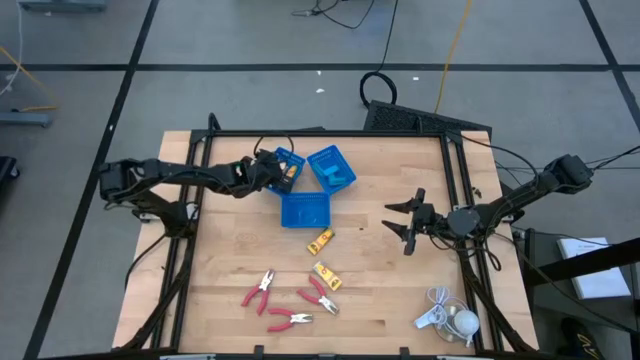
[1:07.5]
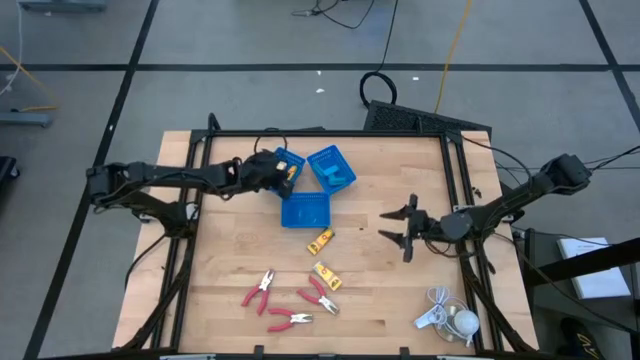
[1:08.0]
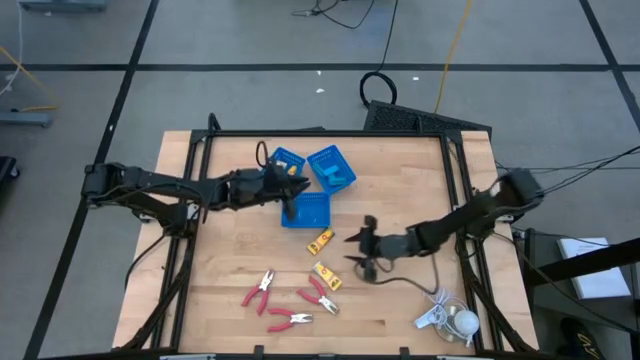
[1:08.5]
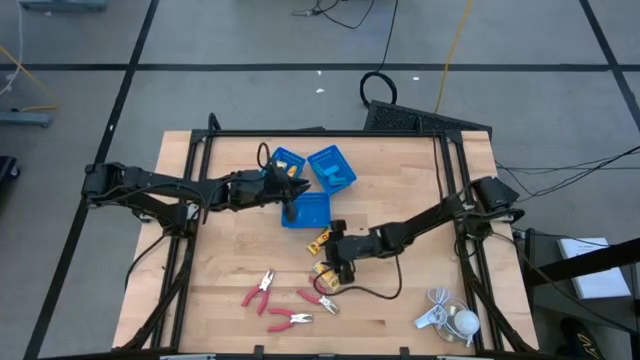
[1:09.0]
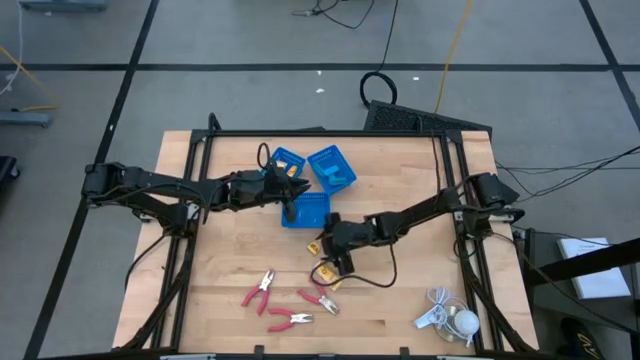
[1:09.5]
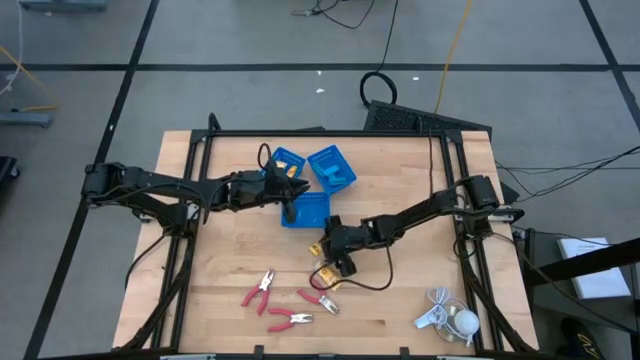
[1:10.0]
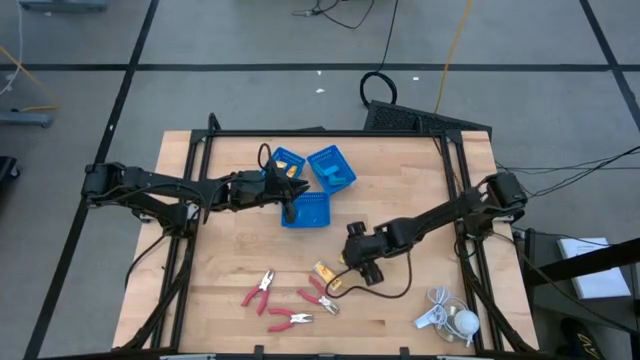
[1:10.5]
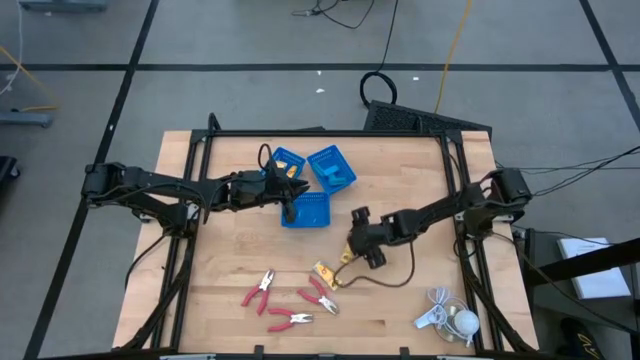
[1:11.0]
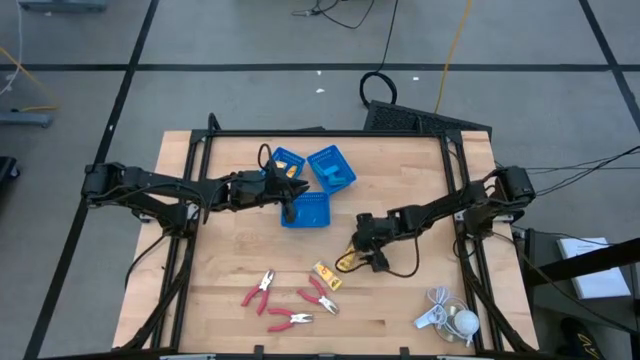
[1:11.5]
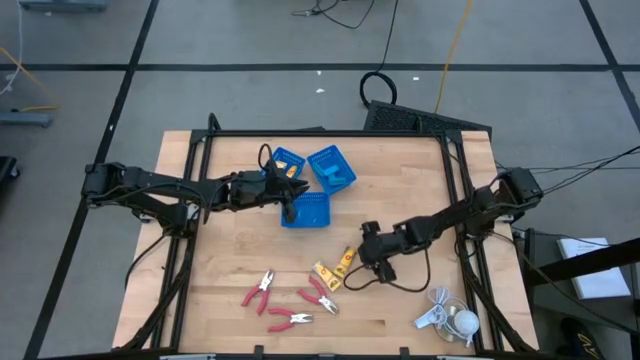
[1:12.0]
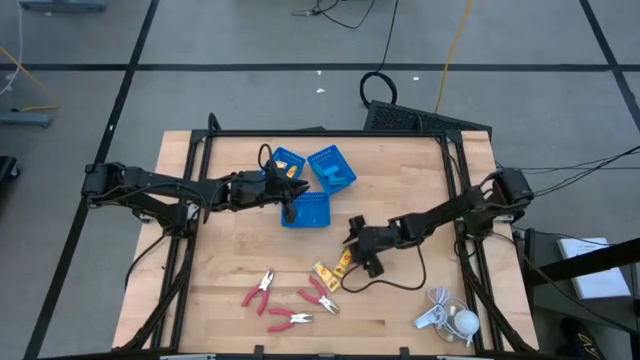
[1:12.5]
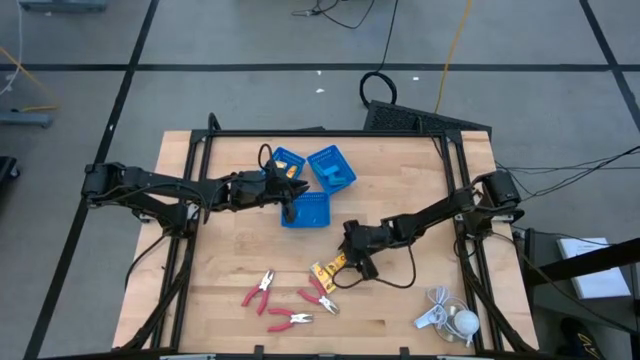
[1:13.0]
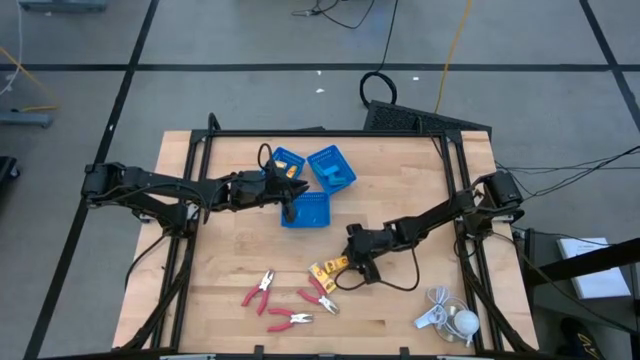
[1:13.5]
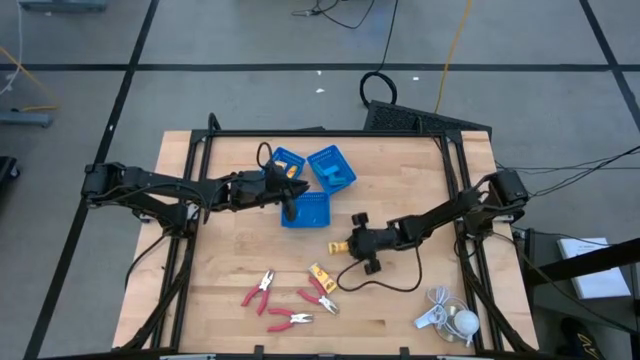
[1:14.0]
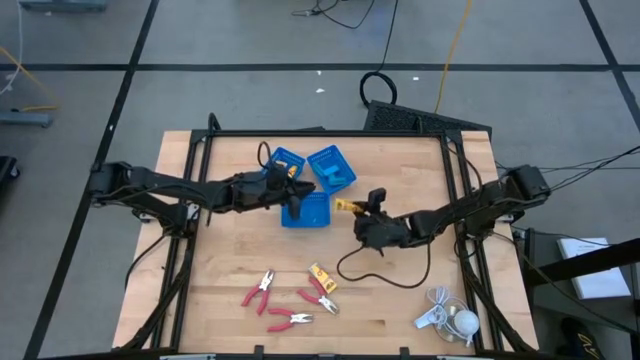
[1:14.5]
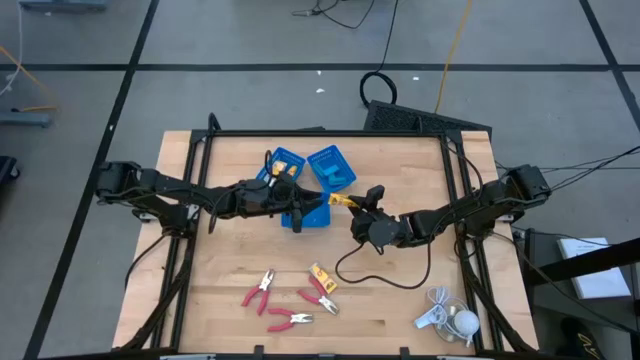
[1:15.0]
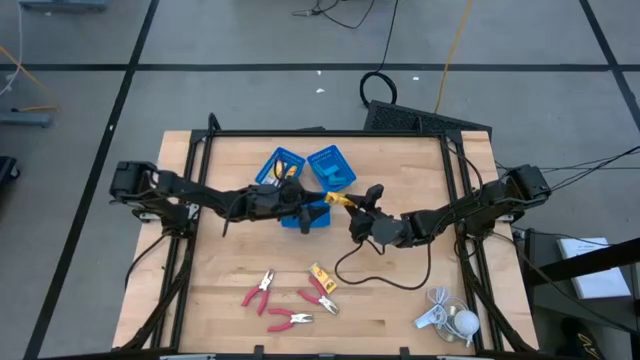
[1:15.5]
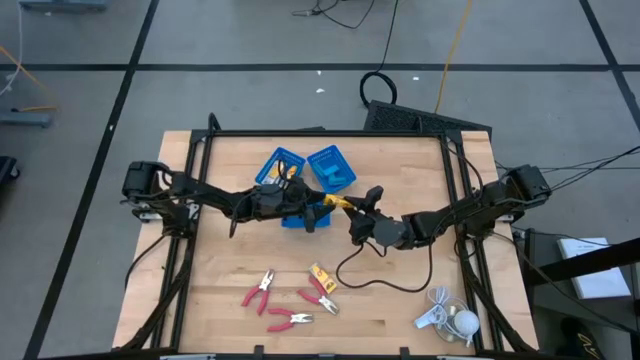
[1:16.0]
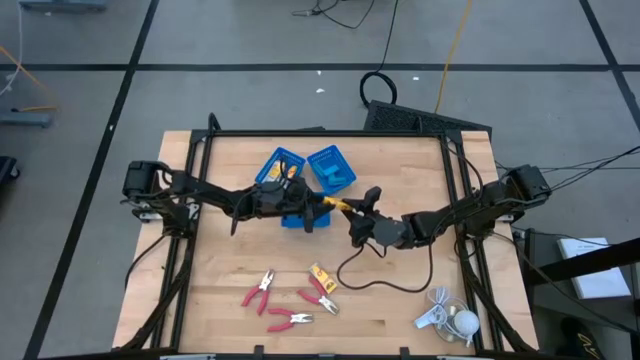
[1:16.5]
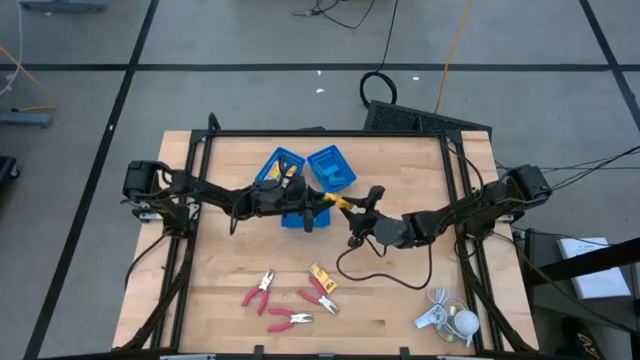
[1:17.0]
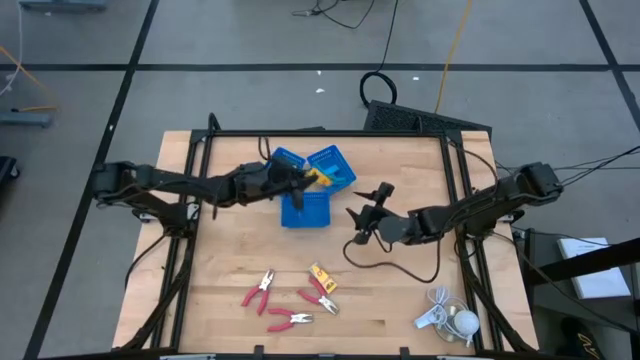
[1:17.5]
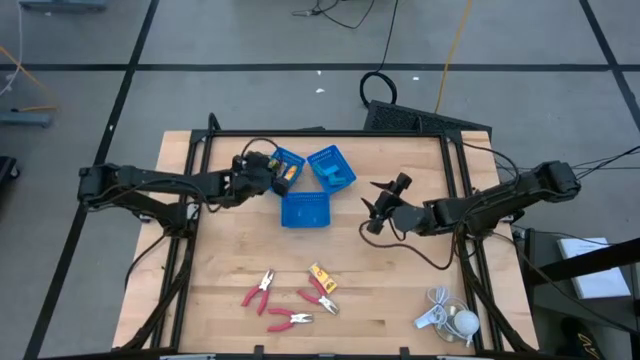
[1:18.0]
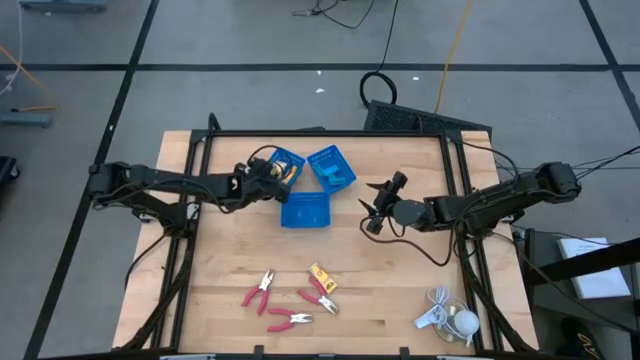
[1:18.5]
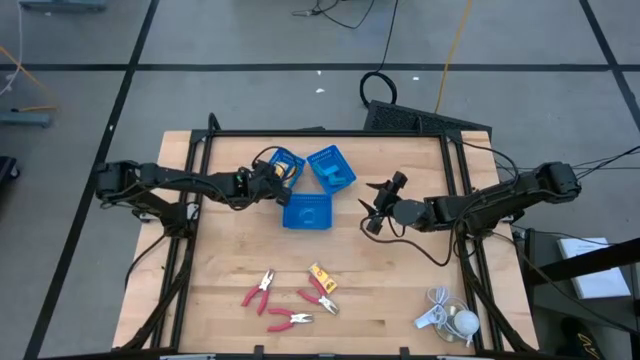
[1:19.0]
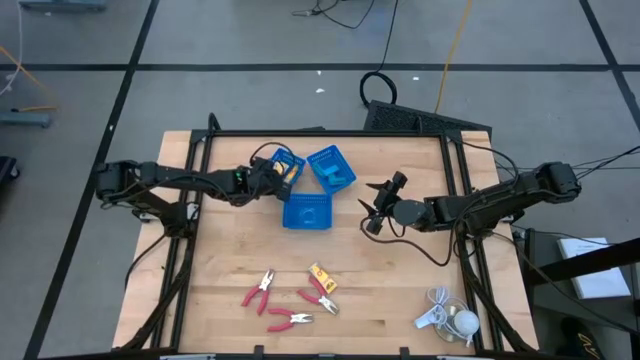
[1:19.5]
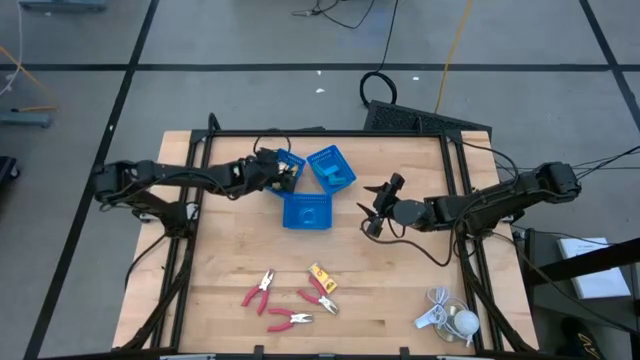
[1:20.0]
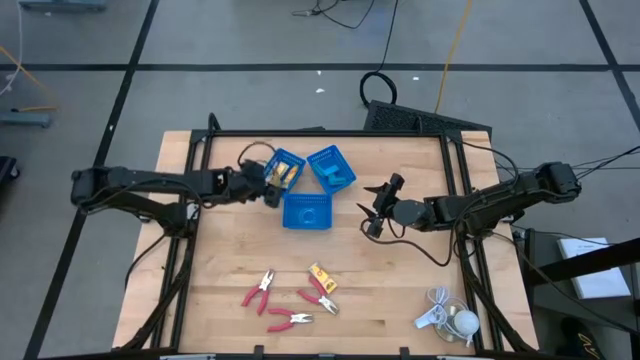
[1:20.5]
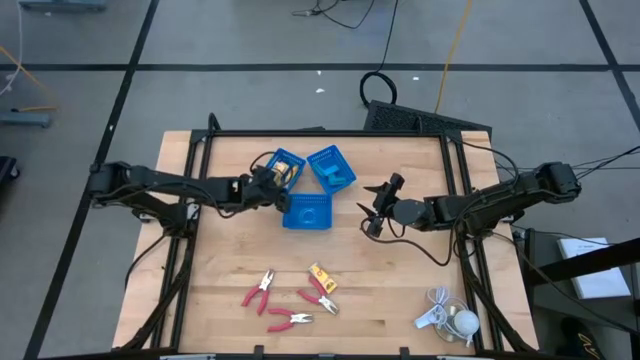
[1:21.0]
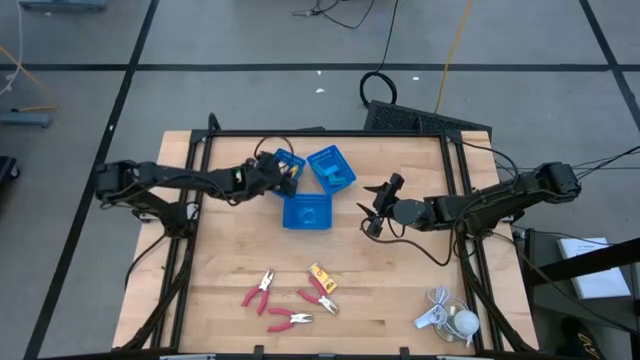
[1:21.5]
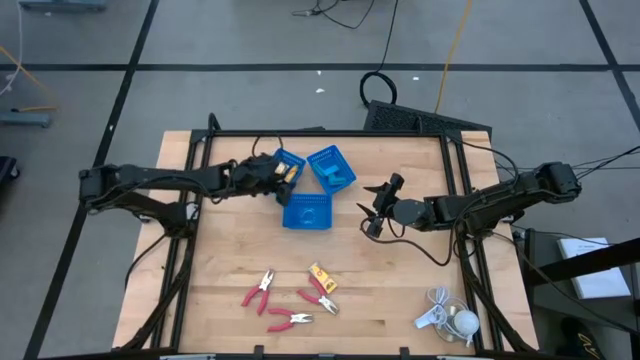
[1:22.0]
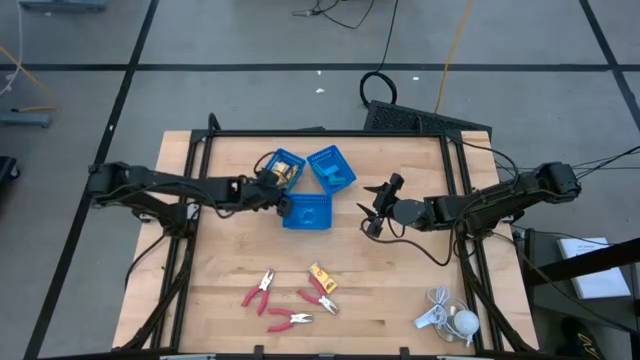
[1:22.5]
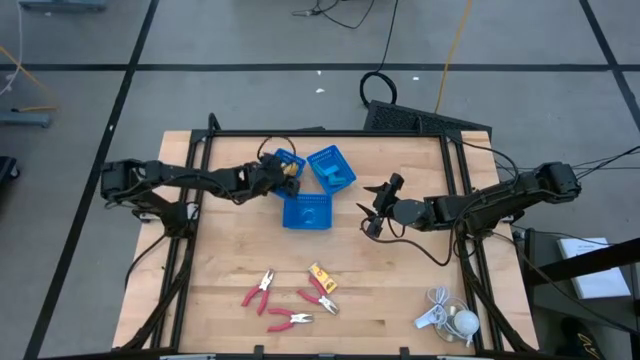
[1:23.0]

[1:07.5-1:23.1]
Task: Pick & Place School Supplies
Put the yellow crayon box into the top left blue bin

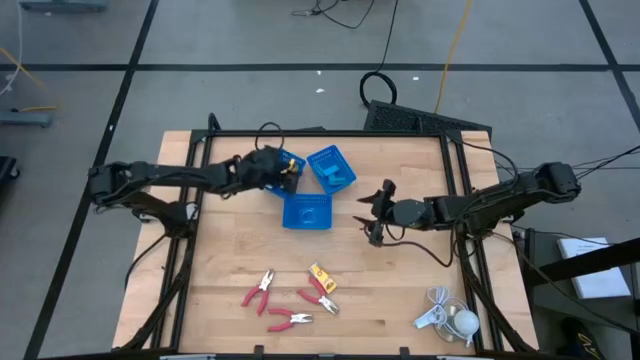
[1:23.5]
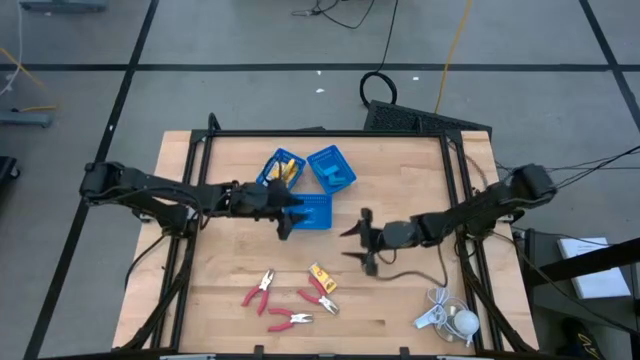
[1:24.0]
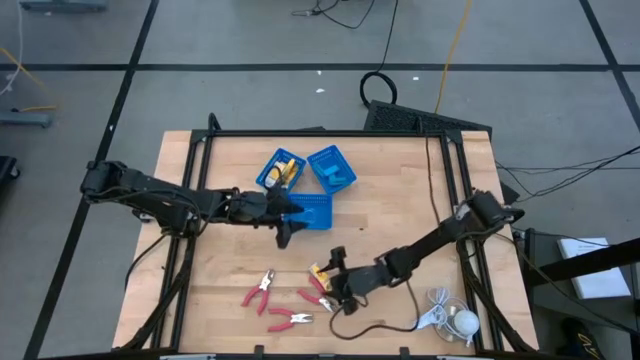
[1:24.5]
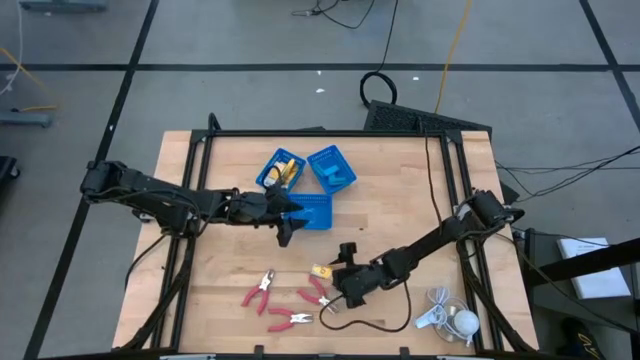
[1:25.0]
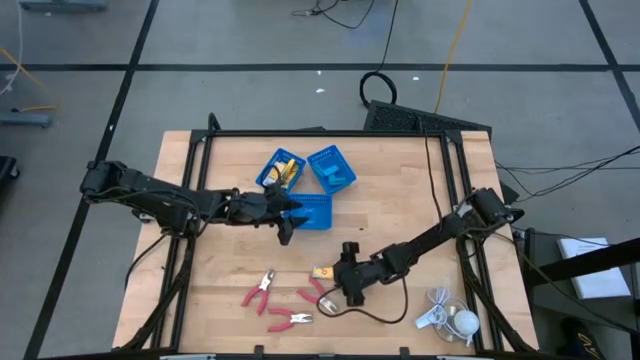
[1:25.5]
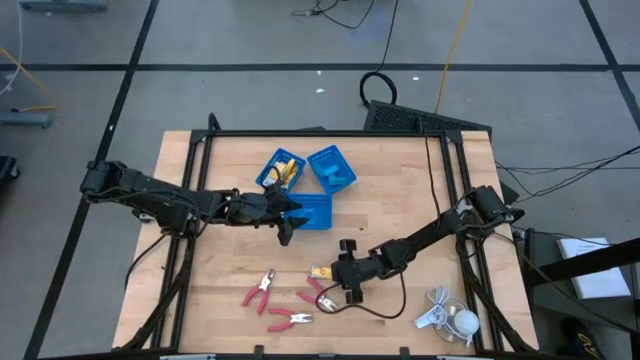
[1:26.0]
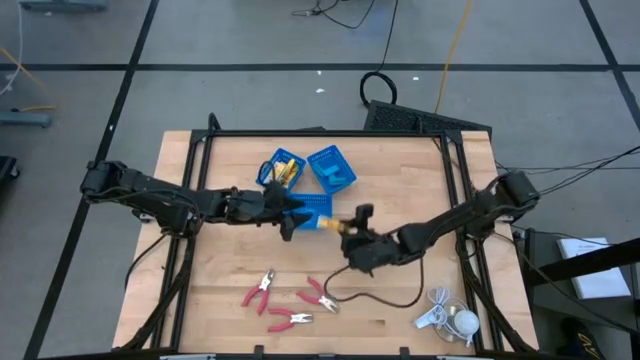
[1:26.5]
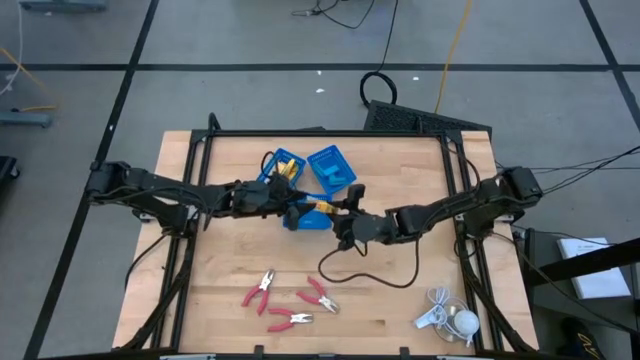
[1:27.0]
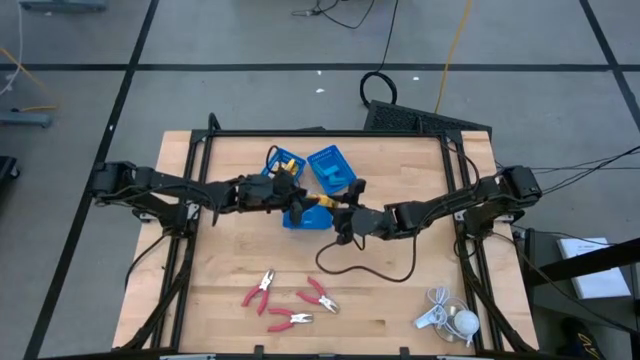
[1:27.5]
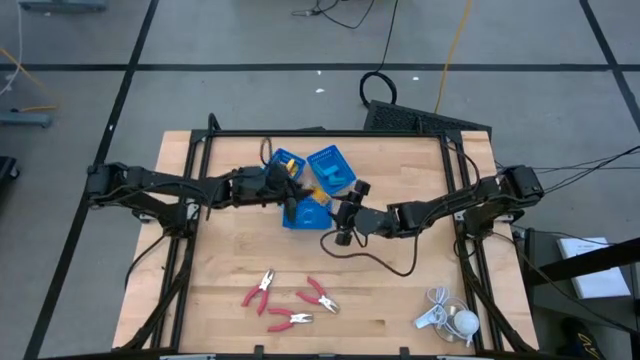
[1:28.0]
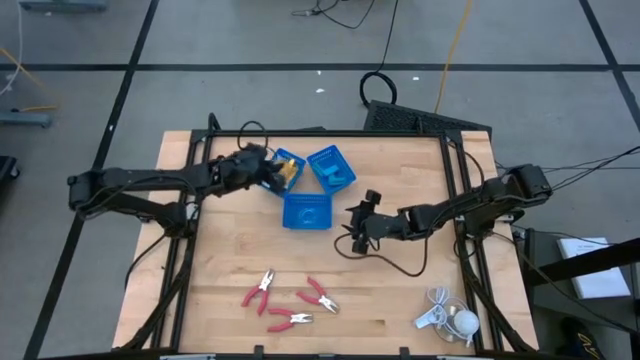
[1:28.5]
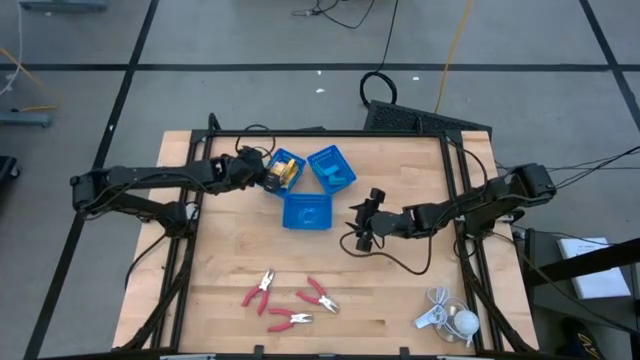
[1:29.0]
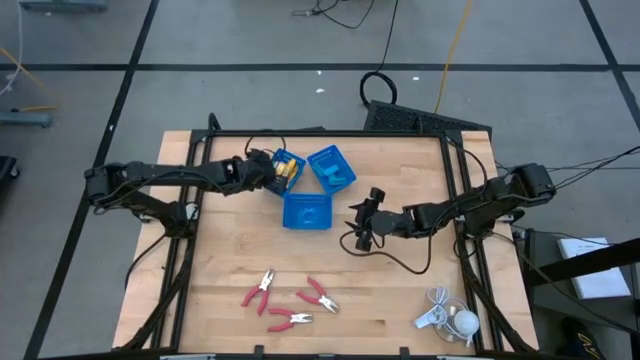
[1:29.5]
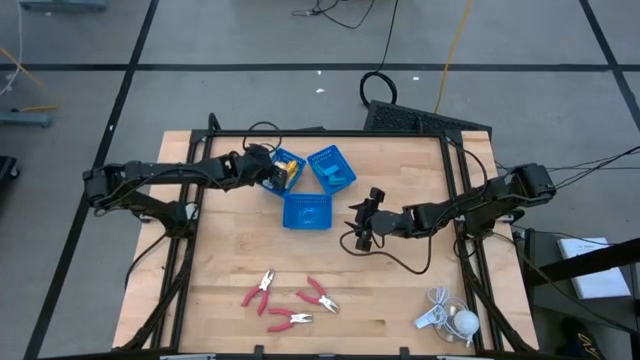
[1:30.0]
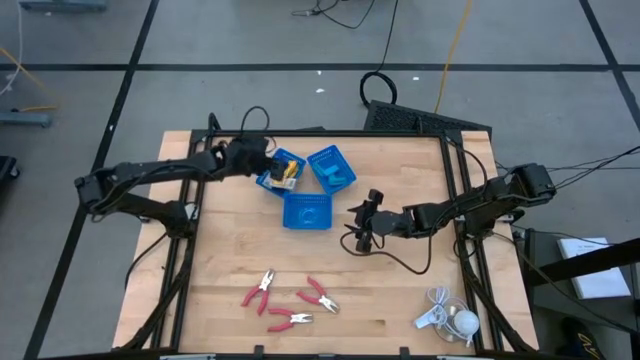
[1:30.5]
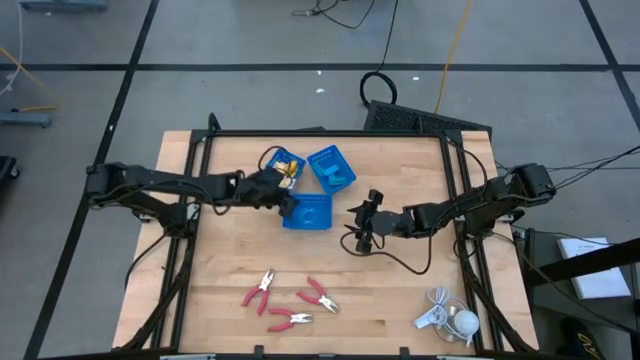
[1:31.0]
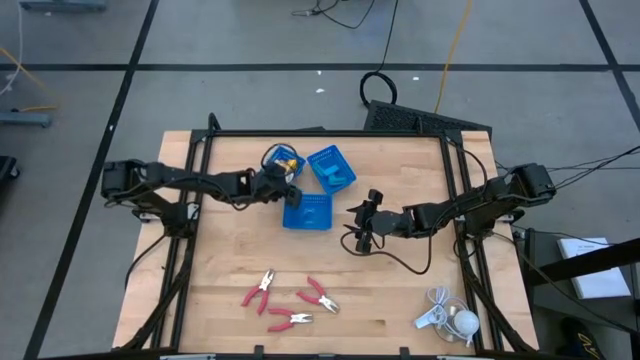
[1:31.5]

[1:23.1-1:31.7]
Put the yellow crayon box into the top left blue bin
